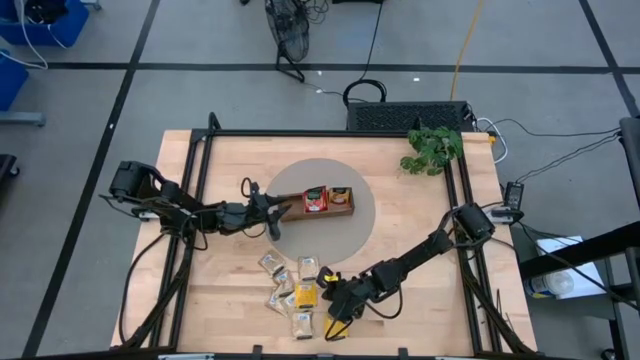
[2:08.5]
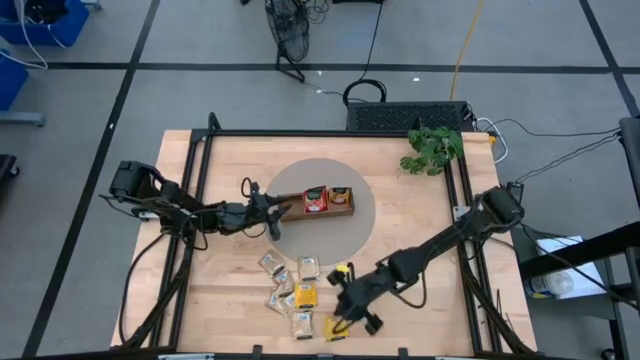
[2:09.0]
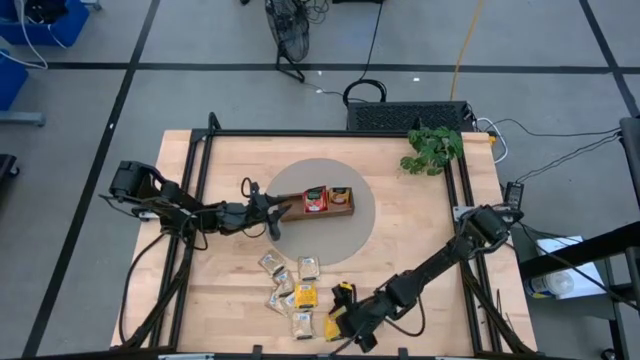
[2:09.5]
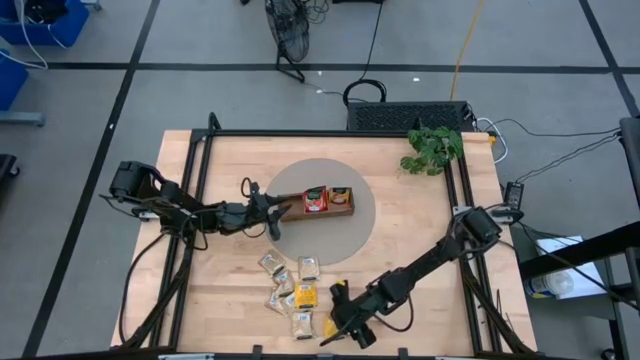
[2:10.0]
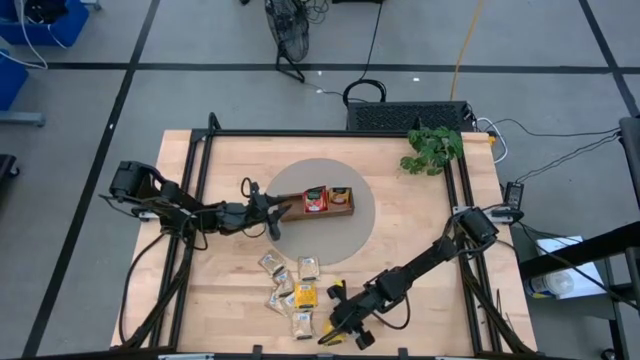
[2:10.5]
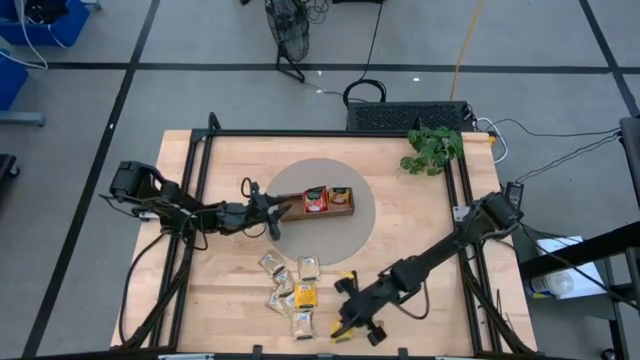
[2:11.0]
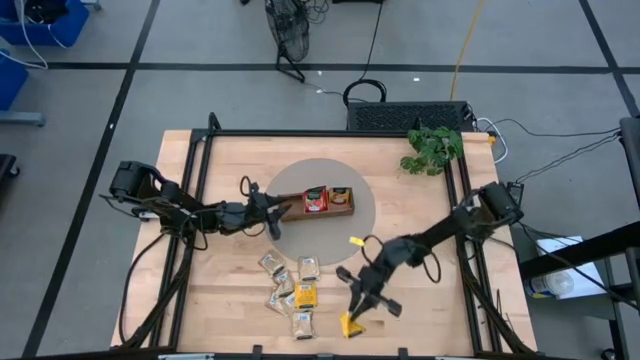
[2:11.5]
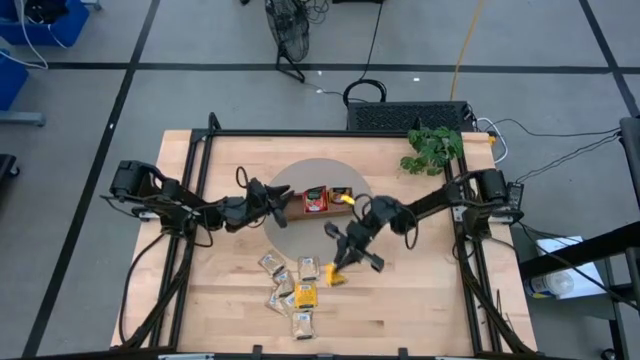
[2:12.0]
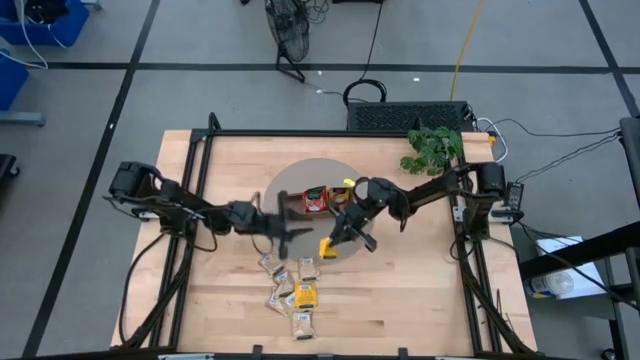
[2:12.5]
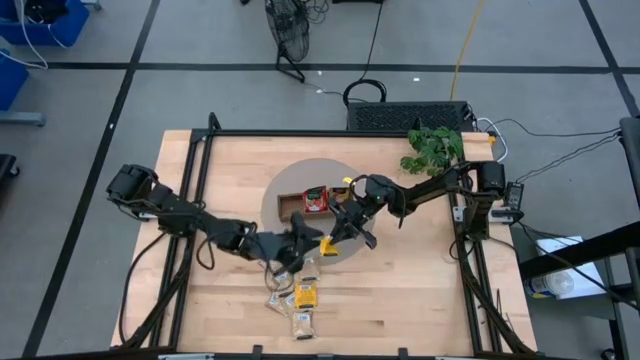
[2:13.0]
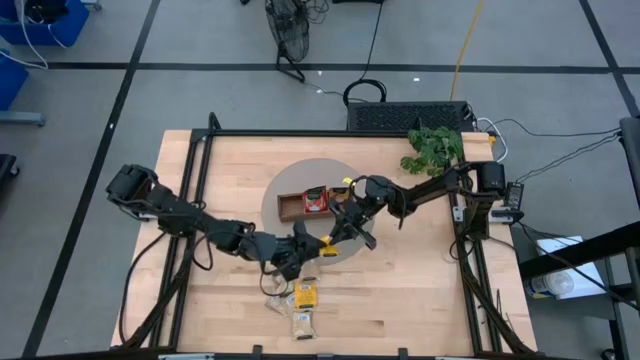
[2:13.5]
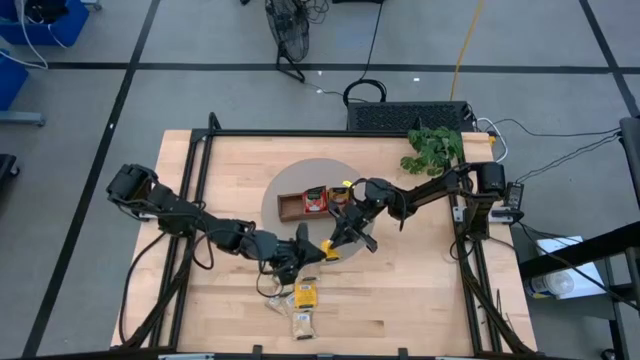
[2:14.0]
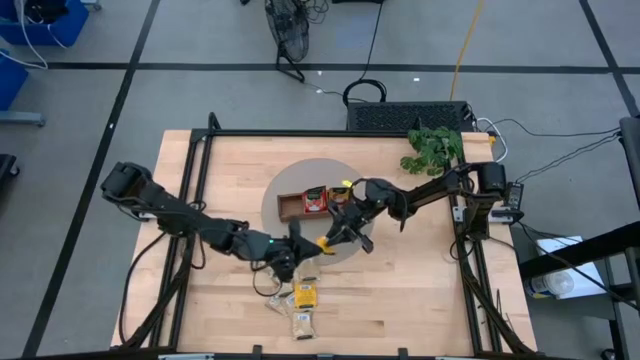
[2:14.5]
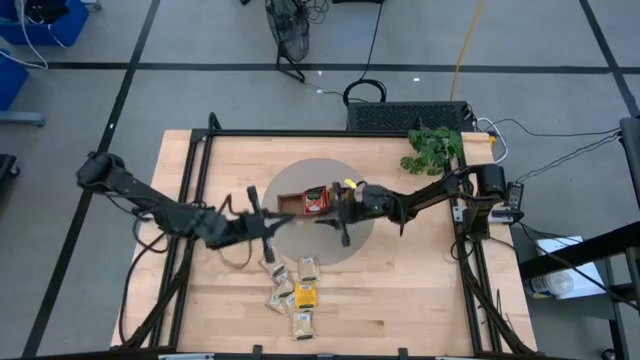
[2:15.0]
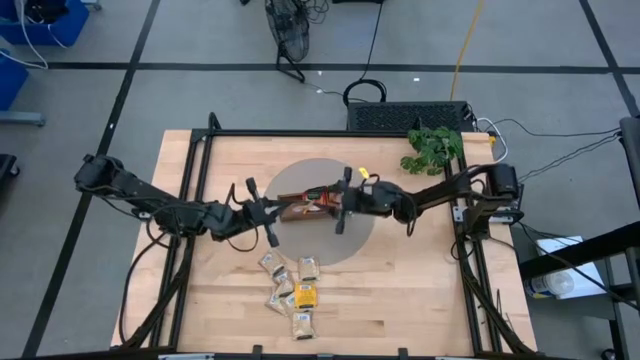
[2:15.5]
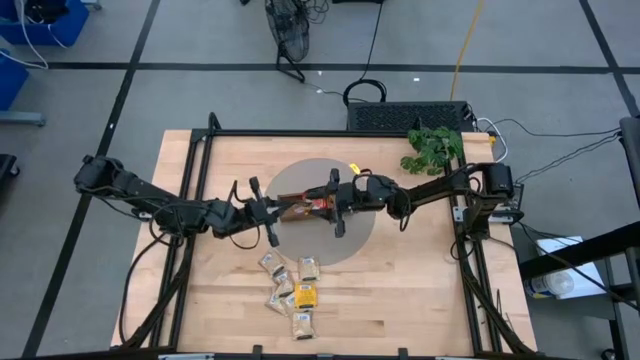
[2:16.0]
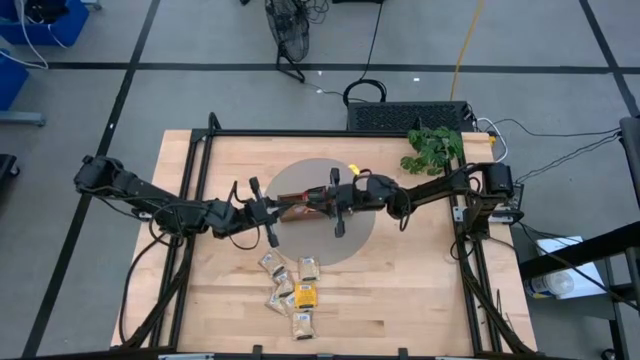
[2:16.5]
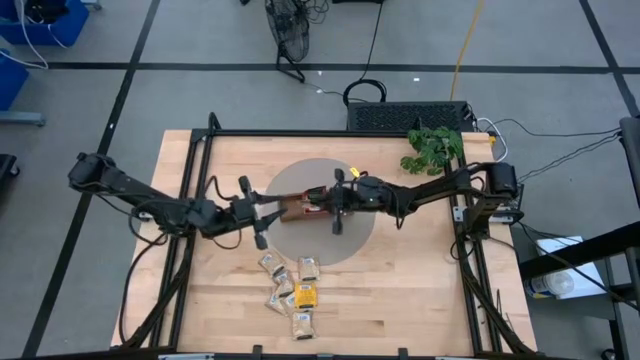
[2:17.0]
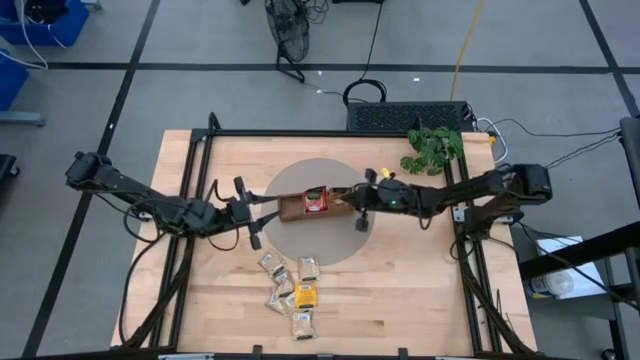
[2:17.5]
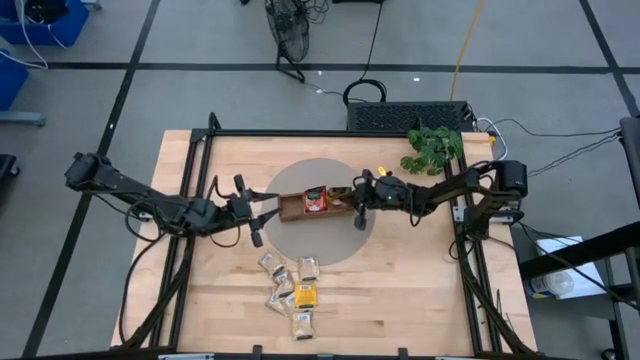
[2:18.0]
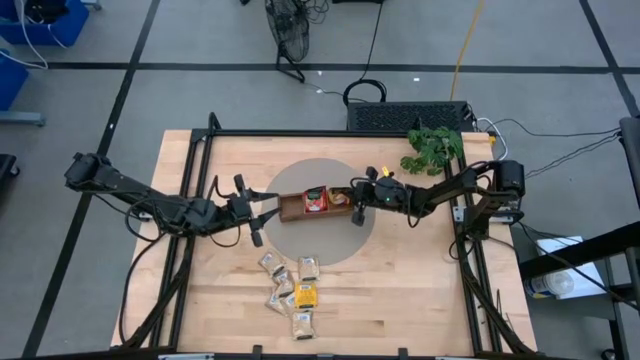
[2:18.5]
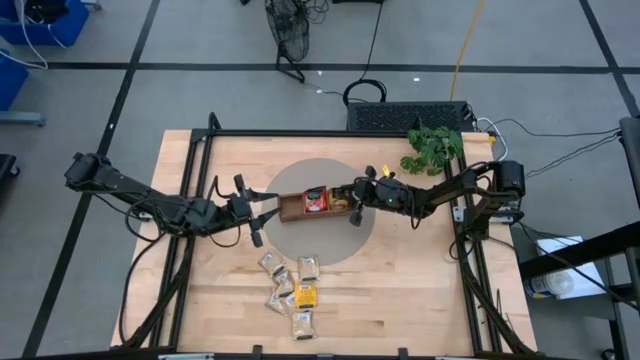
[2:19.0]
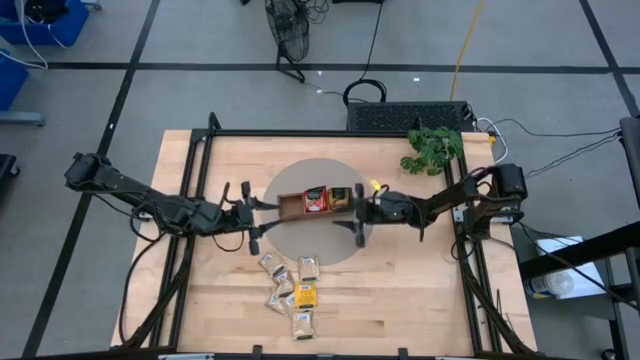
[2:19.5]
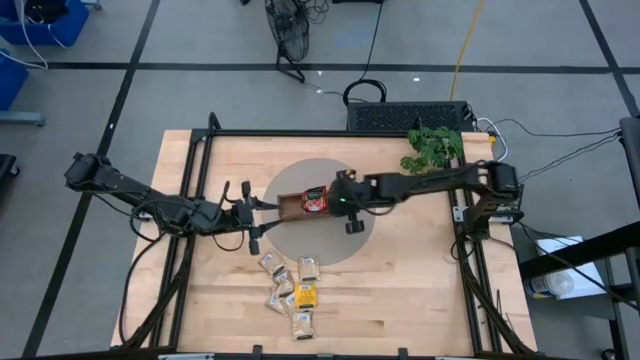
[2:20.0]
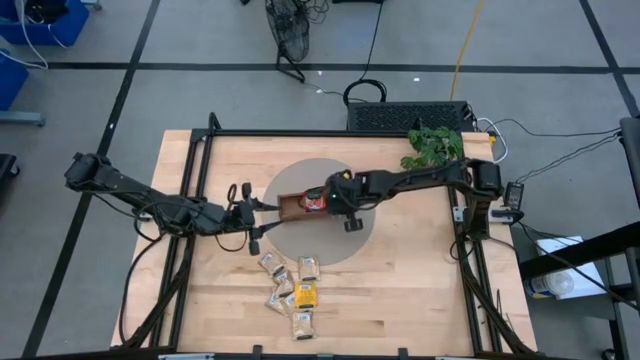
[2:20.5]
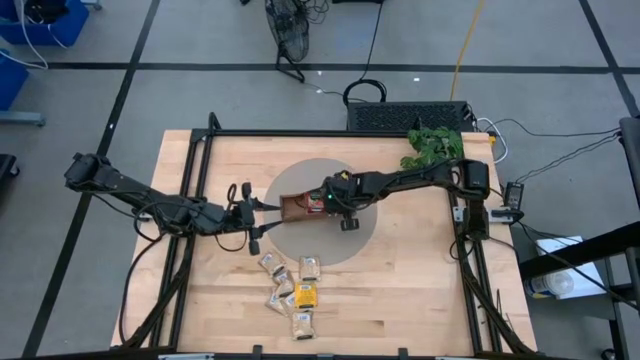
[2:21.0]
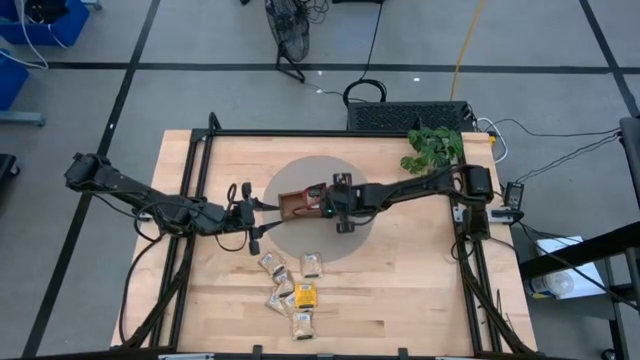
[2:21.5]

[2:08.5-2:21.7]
Task: Pick & Place Tea
Put the yellow tea bag into the wooden organizer

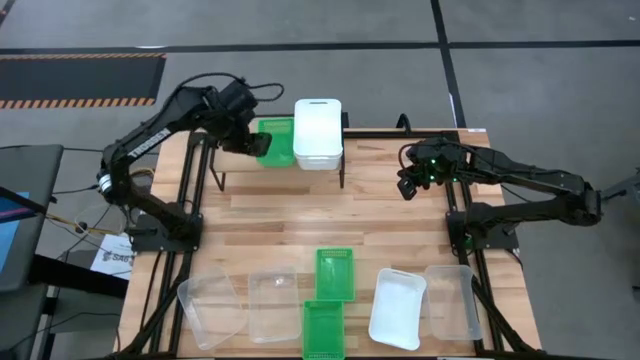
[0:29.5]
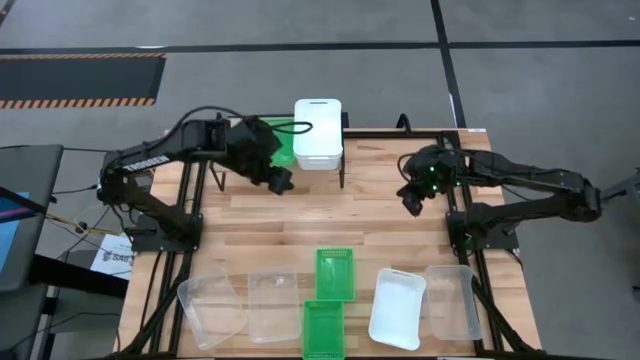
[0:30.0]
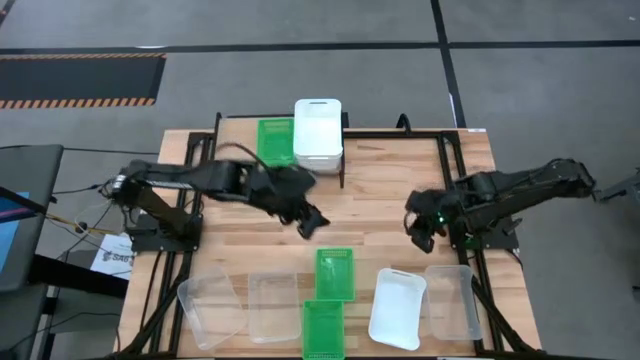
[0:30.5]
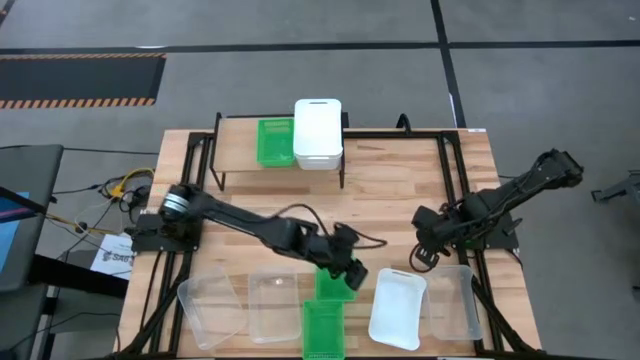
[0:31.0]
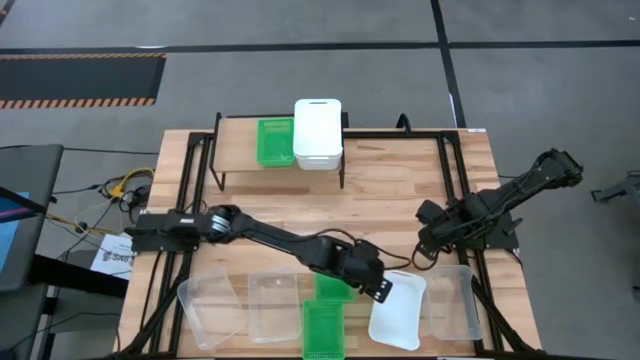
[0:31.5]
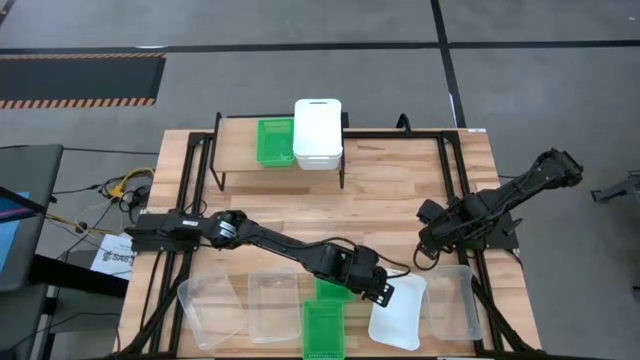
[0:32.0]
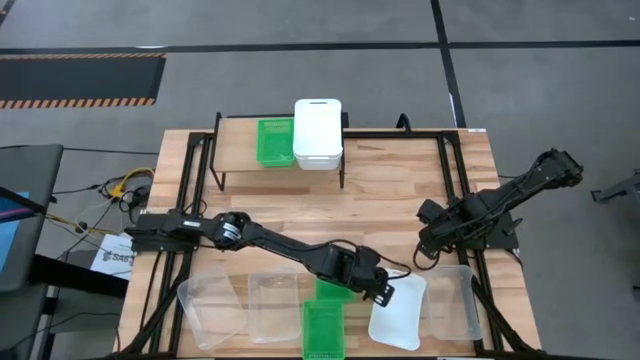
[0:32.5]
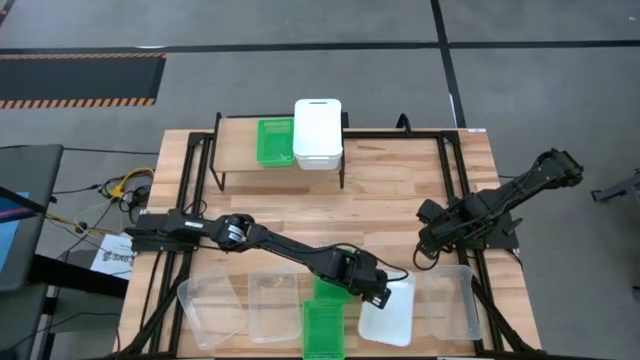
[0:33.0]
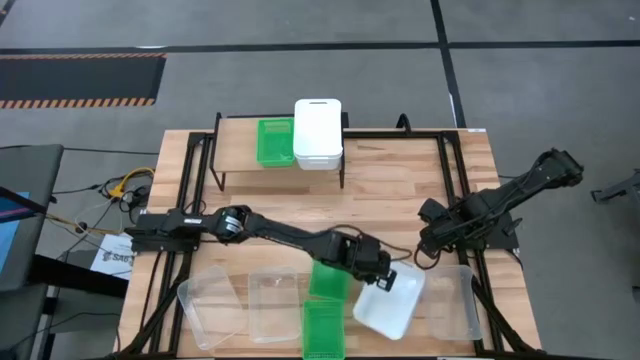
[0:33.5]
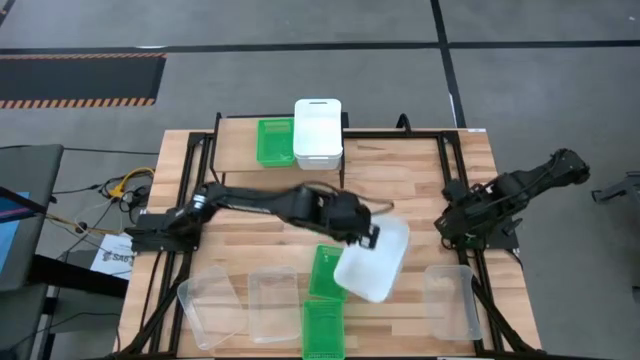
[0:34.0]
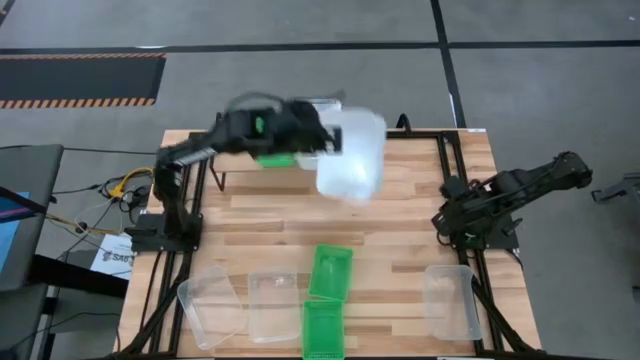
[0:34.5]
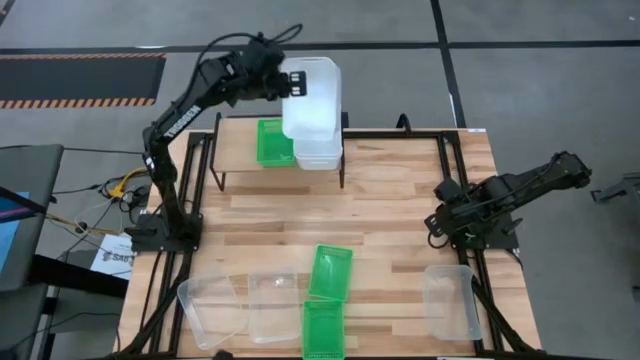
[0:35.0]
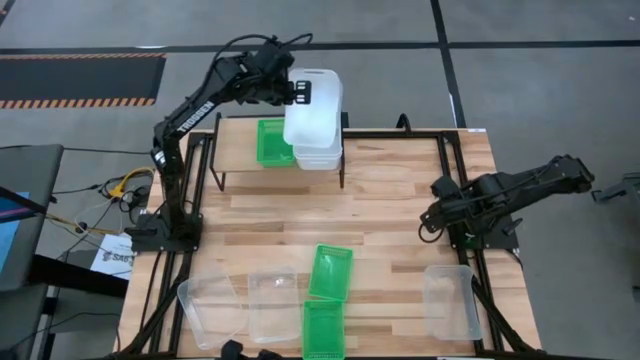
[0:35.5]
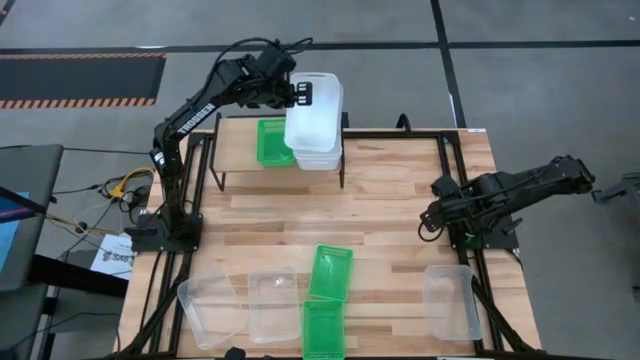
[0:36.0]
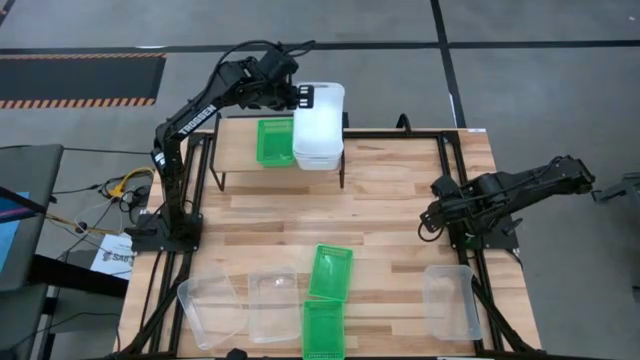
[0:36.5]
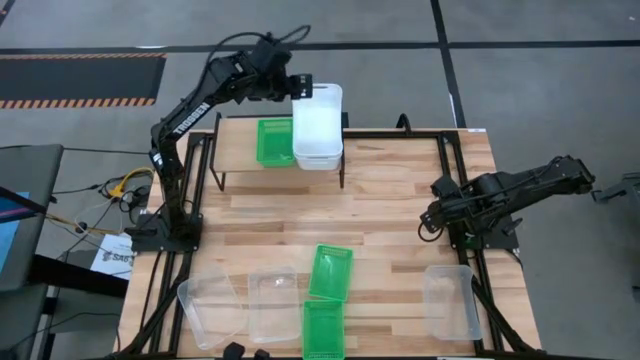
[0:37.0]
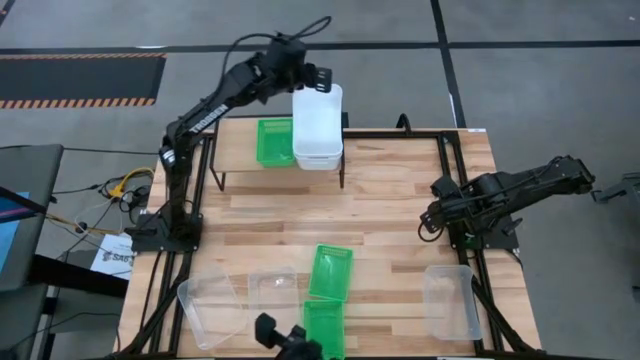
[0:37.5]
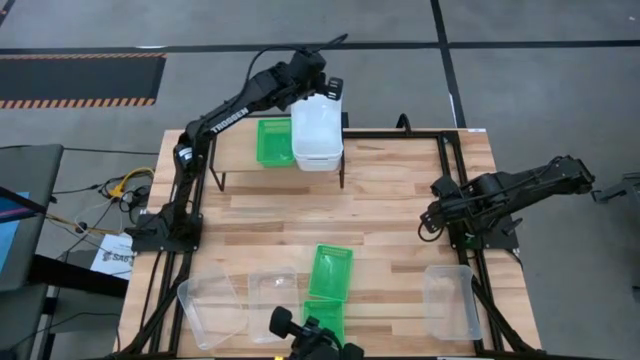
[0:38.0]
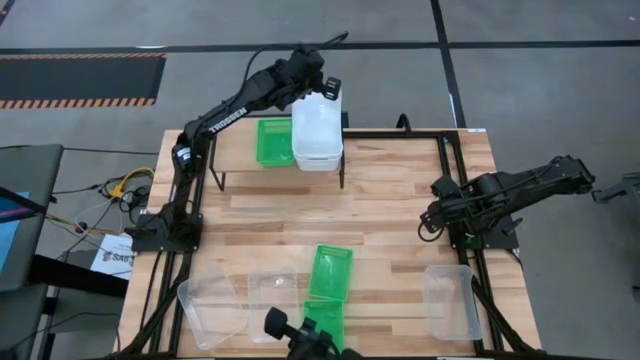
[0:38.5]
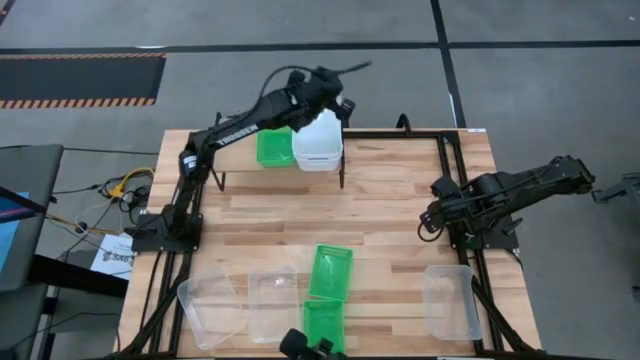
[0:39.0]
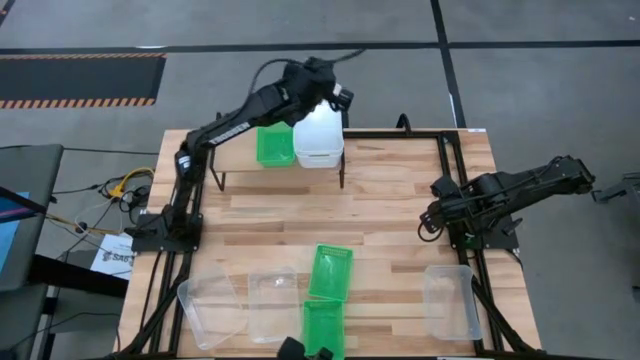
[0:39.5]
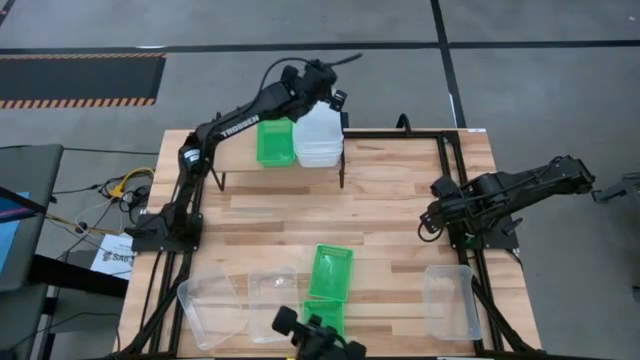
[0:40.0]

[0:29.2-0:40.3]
Task: Stack baskets on shelf by color
Stack the white bin on top of the white bins on the shelf
